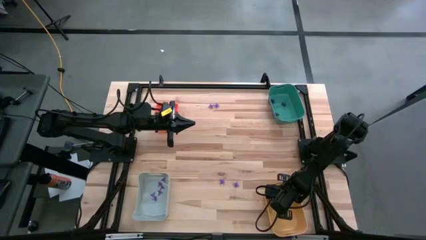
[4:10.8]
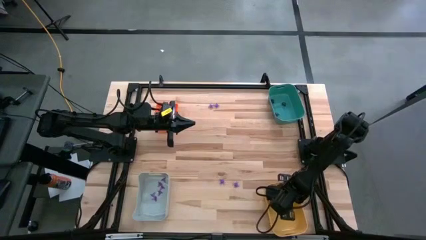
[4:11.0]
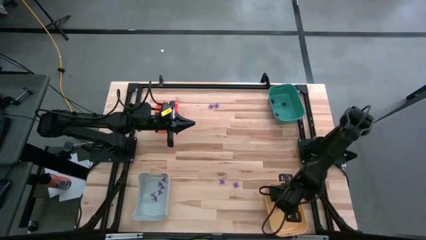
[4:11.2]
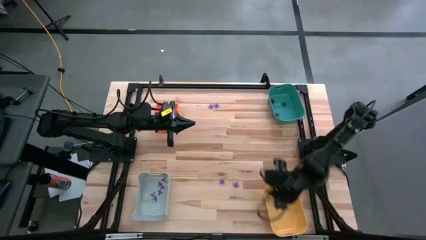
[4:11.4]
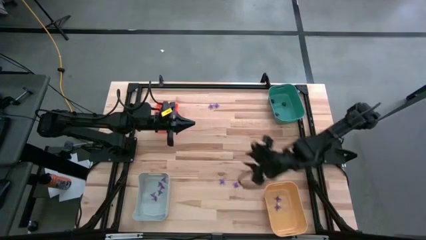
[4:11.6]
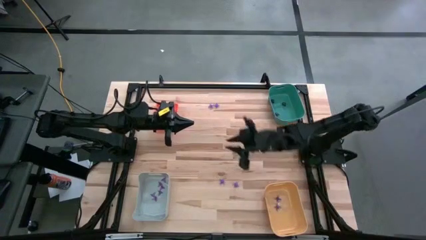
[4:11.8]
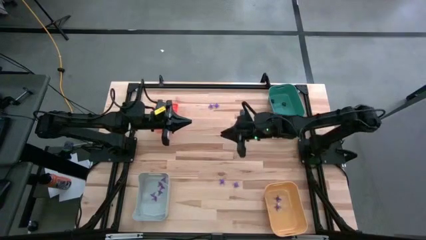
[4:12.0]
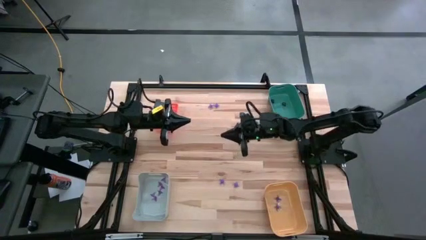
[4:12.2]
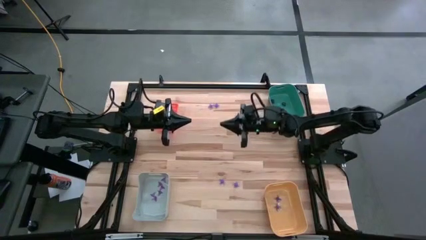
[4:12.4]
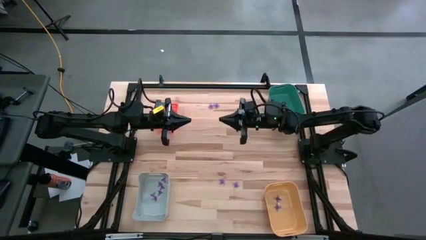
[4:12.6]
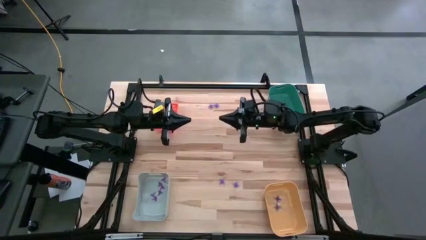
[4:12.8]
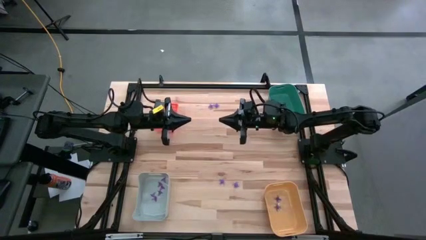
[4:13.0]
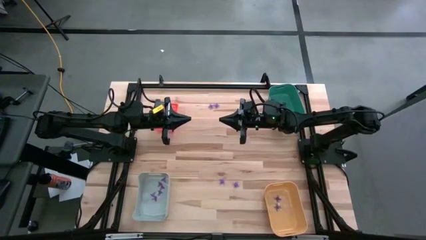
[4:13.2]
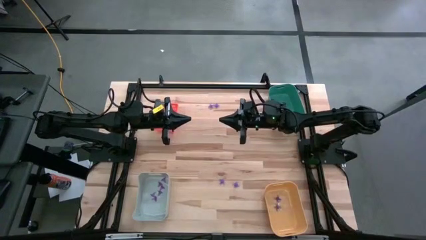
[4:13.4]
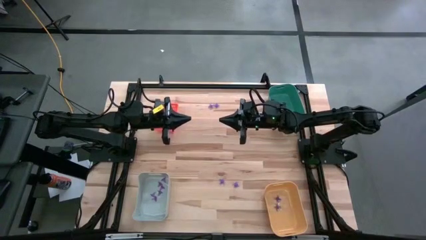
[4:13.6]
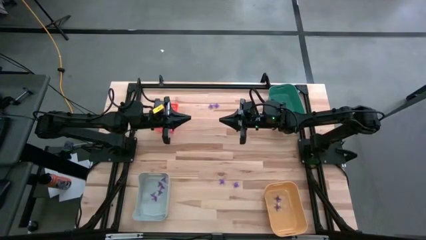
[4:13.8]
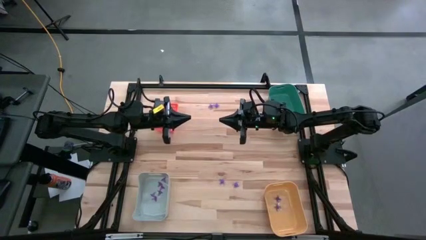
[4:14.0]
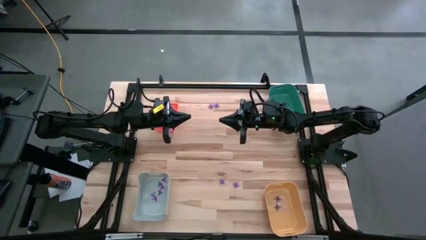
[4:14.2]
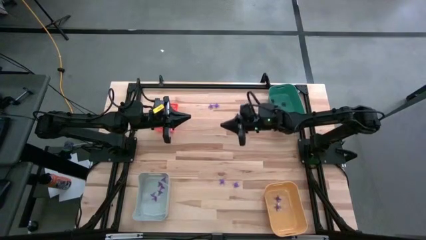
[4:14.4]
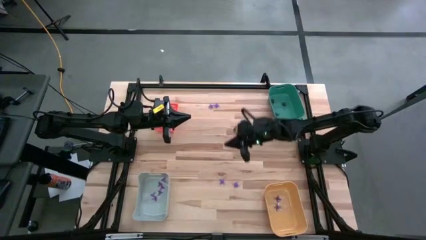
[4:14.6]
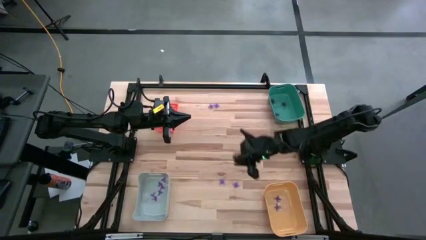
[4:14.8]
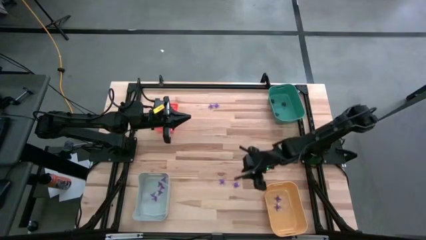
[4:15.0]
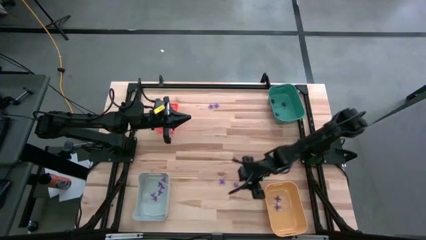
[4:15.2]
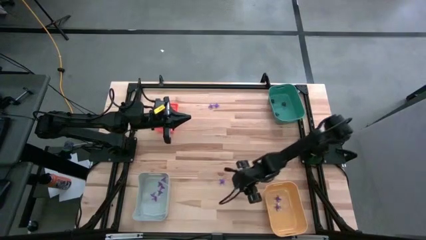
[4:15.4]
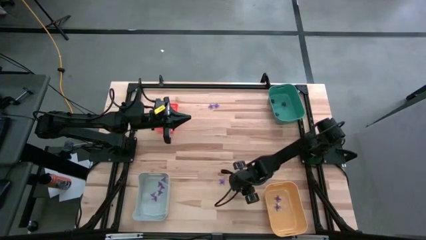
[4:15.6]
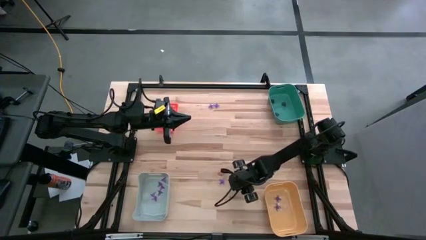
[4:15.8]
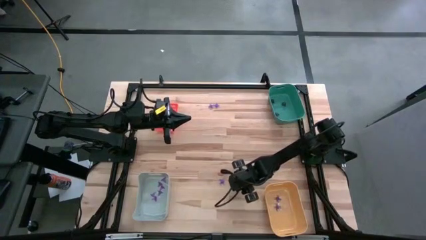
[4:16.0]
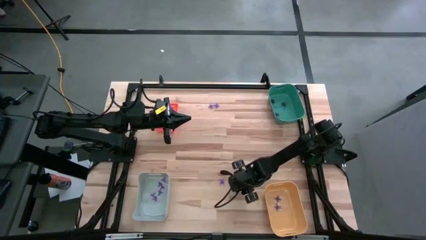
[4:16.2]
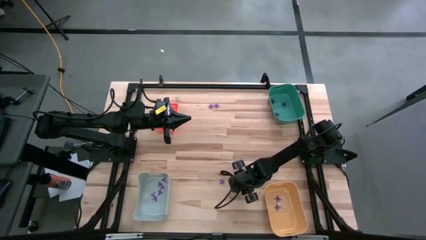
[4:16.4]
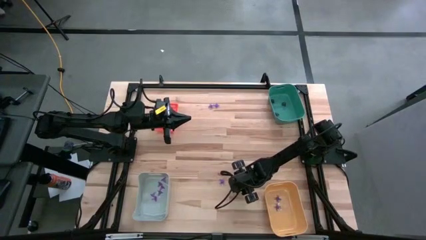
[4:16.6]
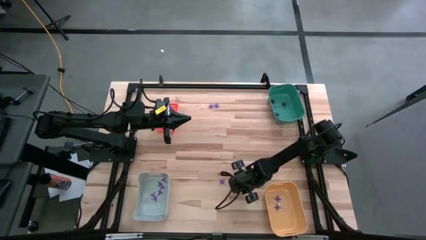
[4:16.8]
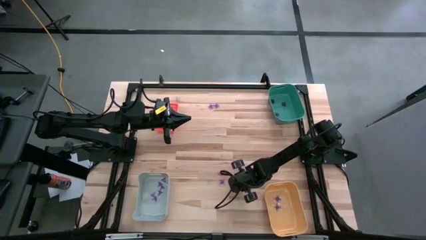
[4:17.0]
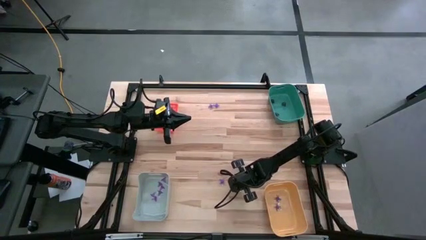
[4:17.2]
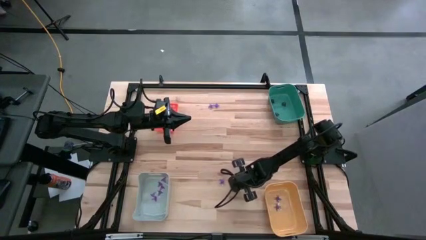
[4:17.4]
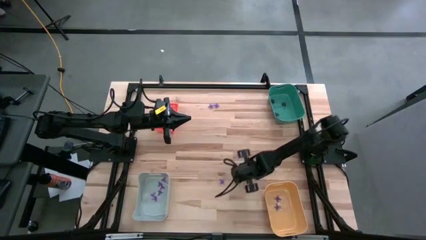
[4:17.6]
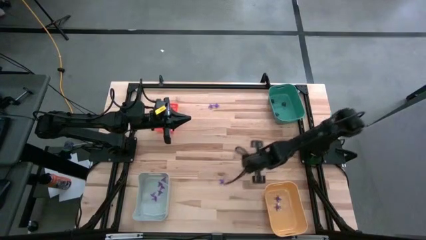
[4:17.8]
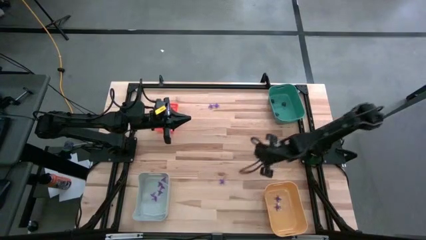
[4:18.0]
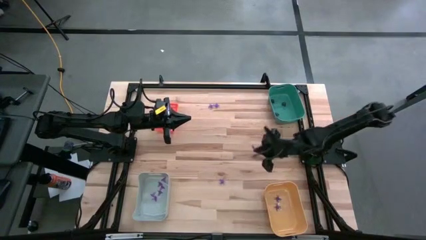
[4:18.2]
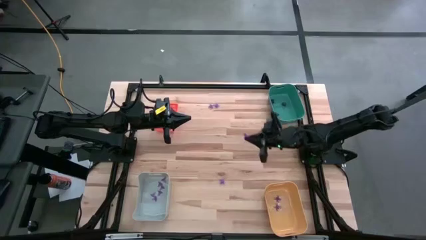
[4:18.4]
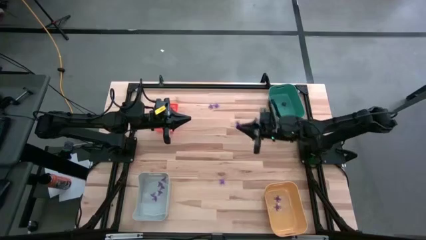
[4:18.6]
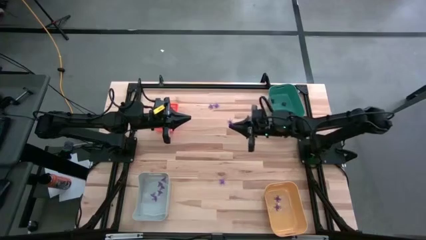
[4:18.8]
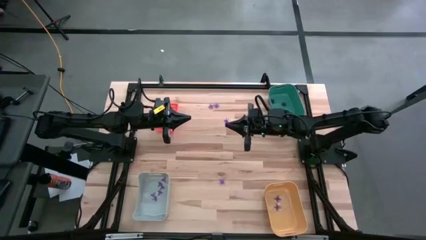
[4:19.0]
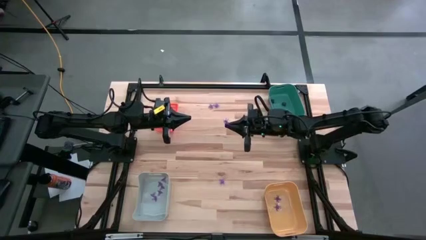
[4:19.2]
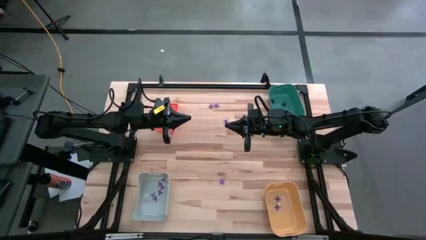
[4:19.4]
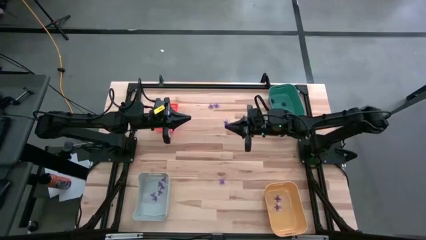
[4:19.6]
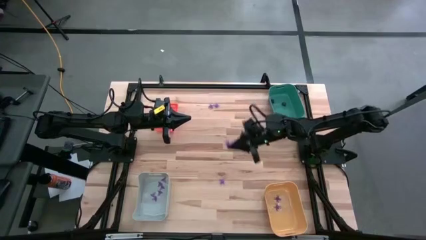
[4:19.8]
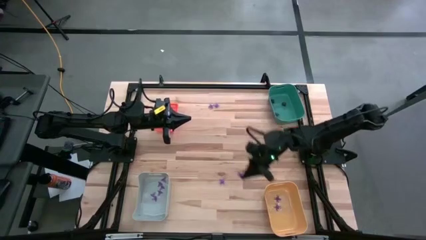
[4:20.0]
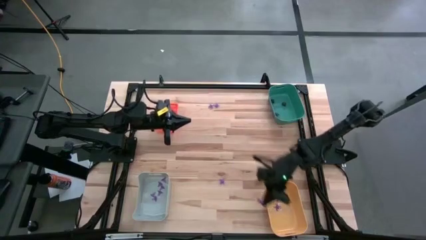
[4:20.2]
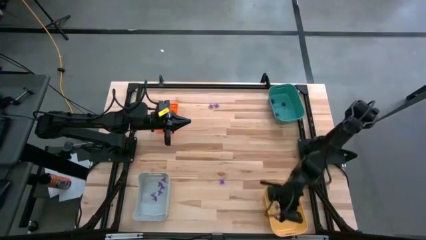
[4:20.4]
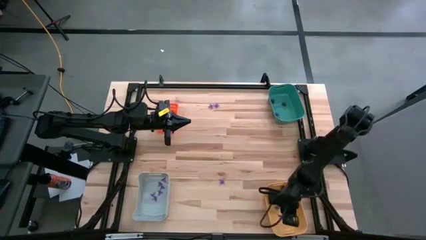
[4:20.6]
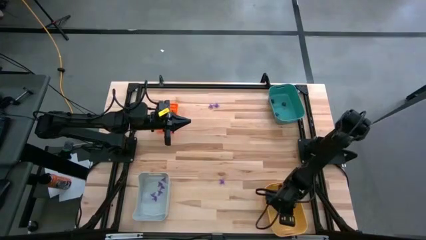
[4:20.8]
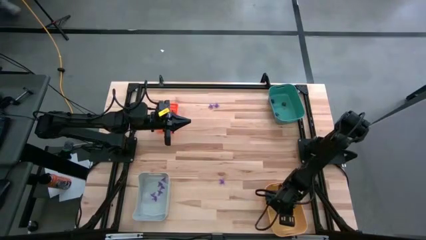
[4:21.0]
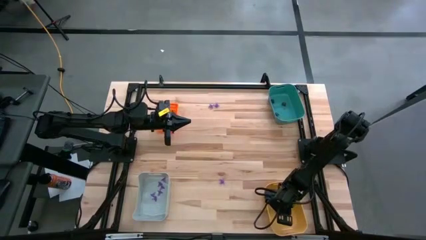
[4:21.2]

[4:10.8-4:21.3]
Task: Sort Halloween decoration
Put the violet spider toy into the yellow bin
